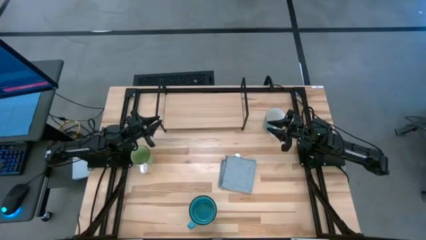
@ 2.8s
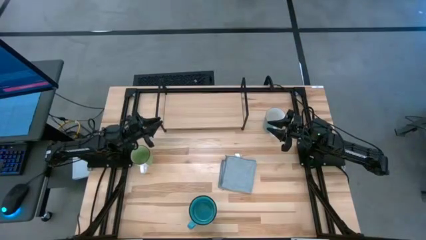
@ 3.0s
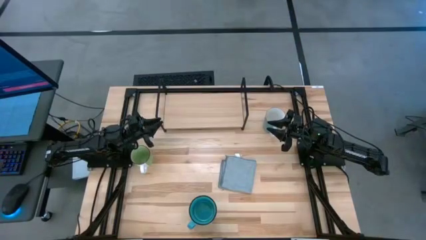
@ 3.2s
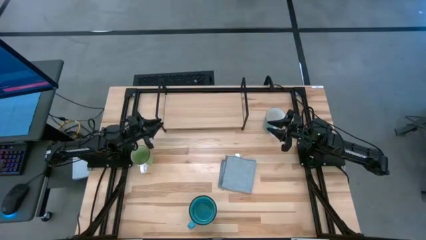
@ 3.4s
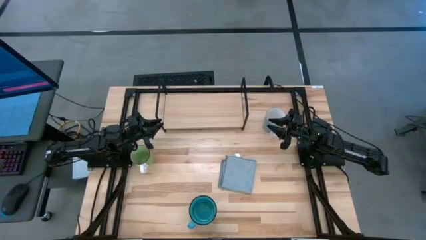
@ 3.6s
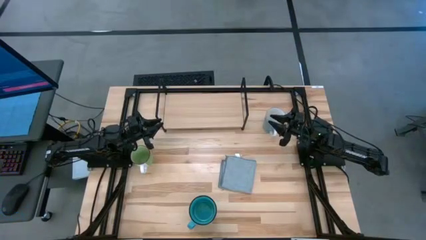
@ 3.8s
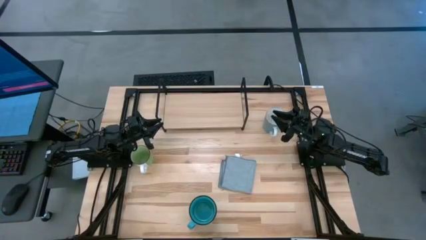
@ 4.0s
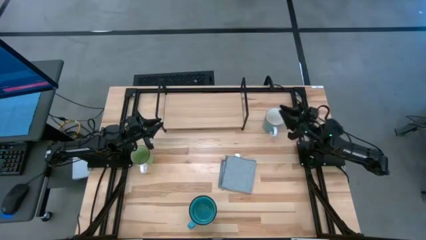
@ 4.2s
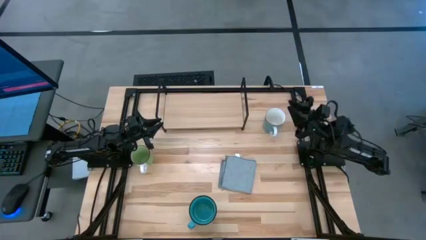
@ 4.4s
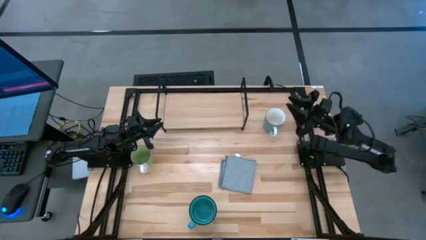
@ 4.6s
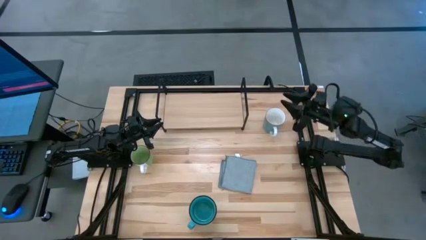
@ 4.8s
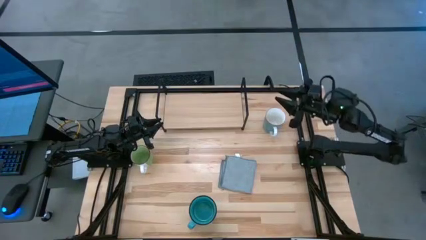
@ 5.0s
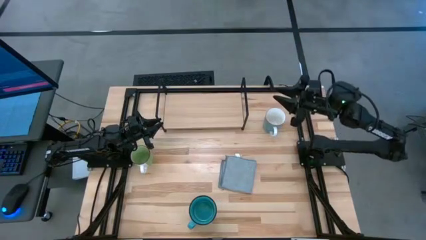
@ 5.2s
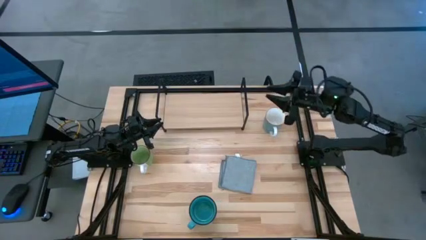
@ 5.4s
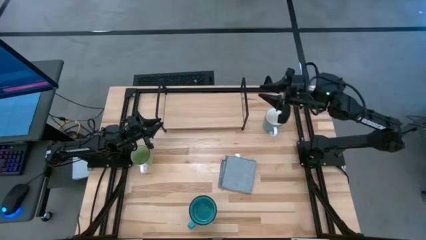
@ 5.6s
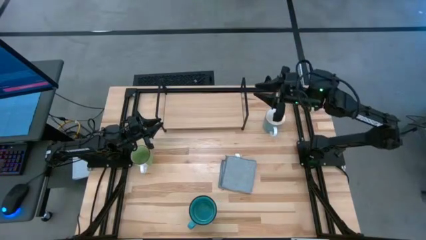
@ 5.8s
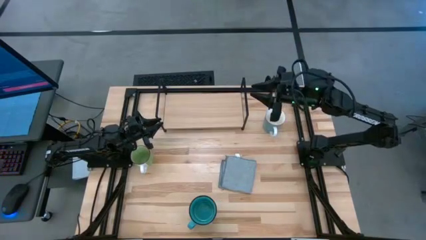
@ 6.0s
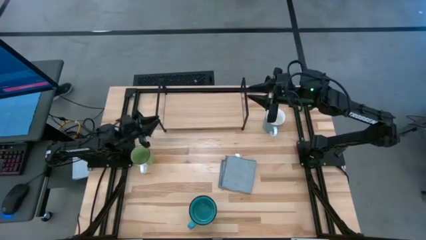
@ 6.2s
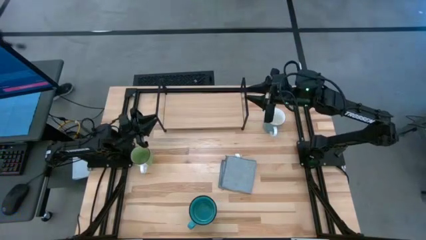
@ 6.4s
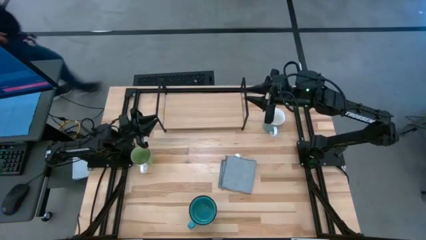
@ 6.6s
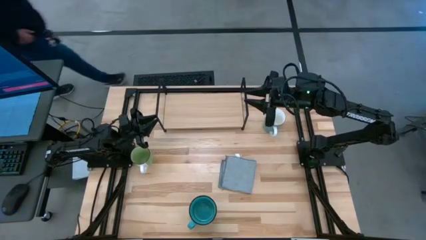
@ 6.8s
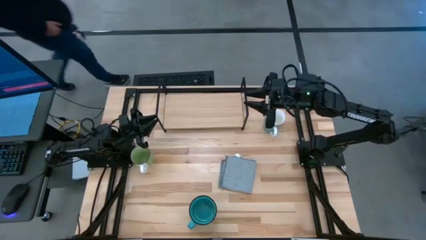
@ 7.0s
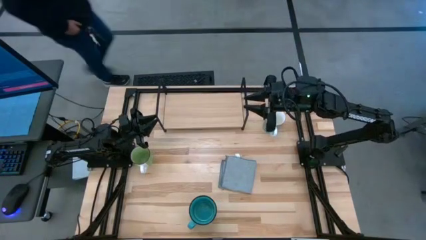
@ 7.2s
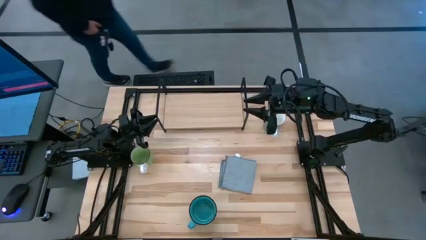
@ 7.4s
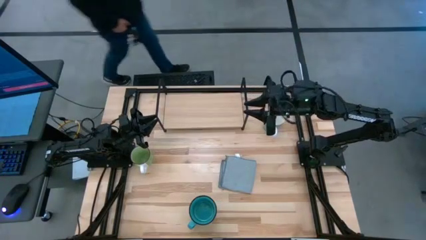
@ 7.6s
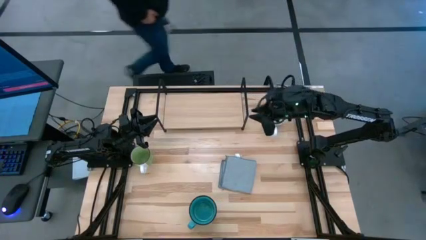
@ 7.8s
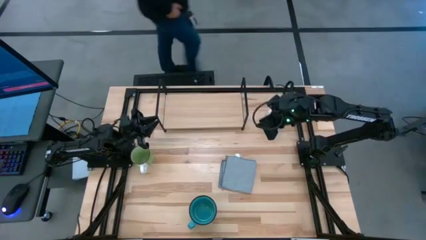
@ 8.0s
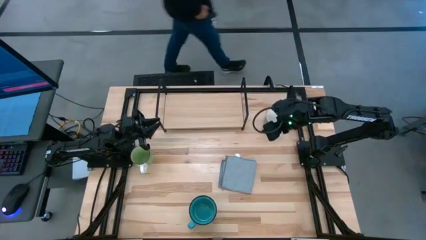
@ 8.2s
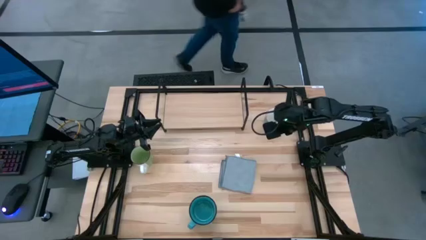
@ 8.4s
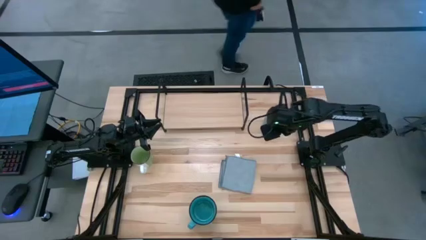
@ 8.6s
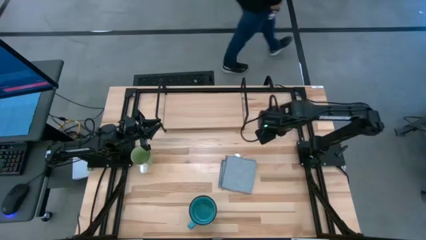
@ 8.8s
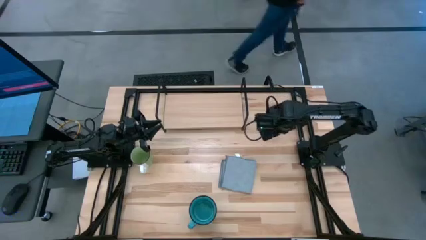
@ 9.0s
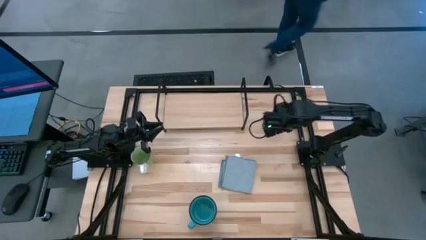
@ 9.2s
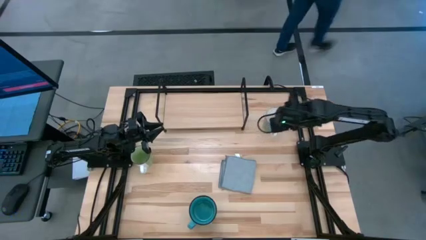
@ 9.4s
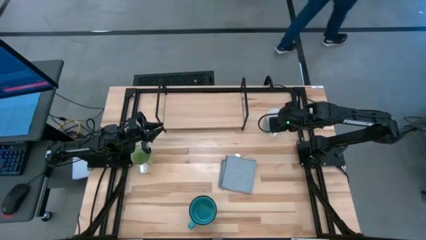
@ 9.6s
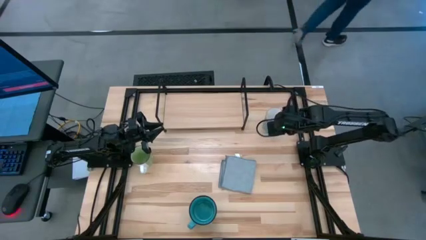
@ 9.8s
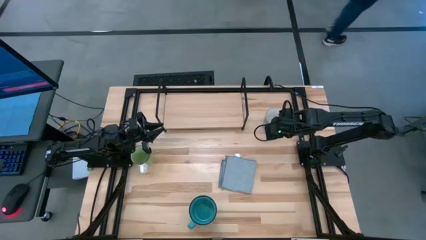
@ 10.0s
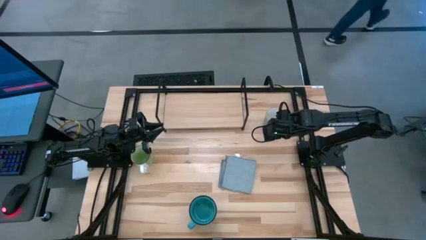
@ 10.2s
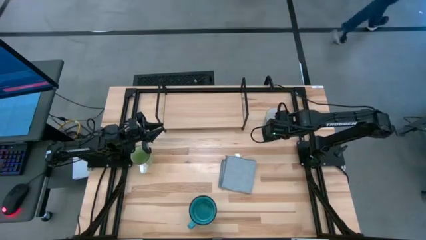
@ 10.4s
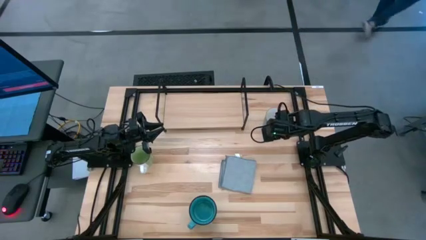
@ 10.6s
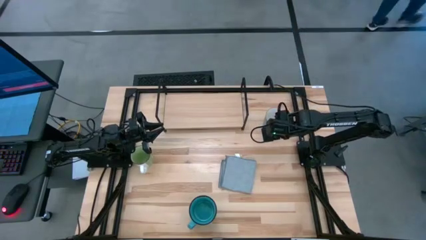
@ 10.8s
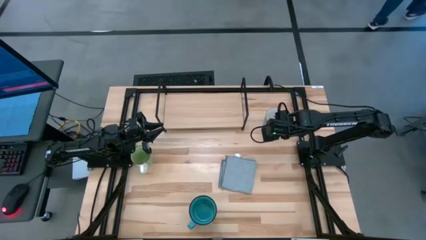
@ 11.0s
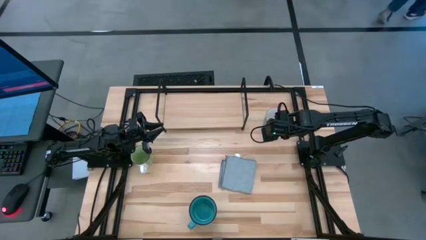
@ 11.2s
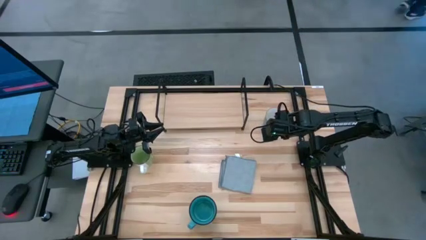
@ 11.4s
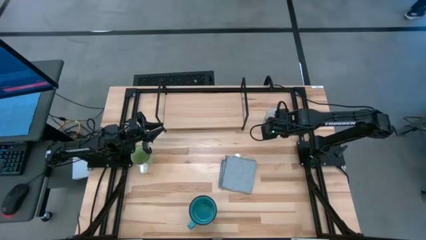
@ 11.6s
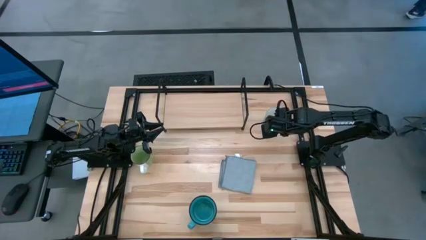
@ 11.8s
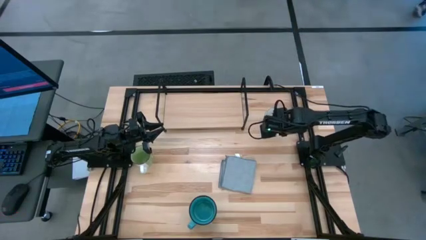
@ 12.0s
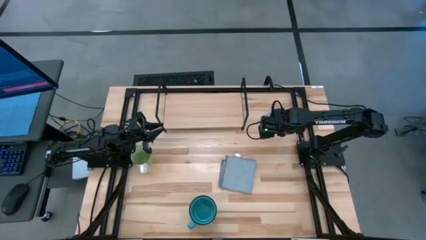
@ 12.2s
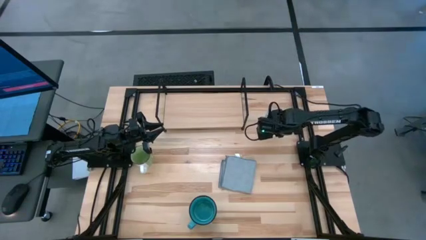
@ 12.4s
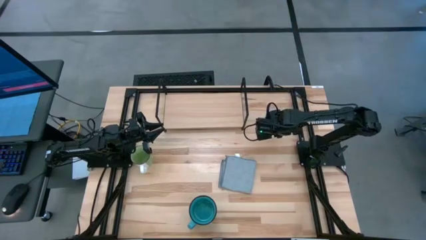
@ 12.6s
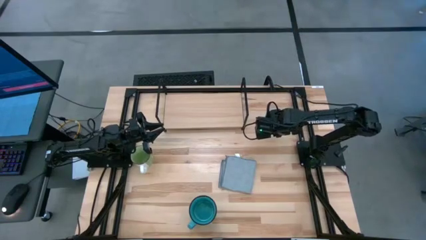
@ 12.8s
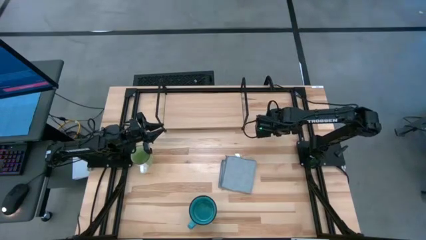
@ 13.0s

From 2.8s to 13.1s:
Task: Stack small to large cups/mugs on shelf
Put the white mug on the shelf

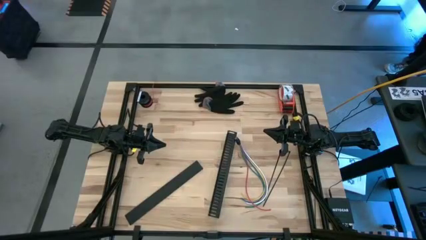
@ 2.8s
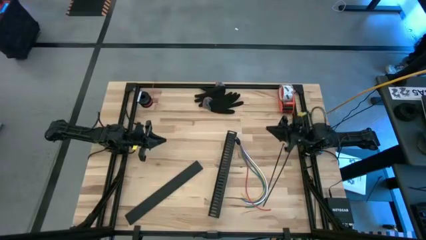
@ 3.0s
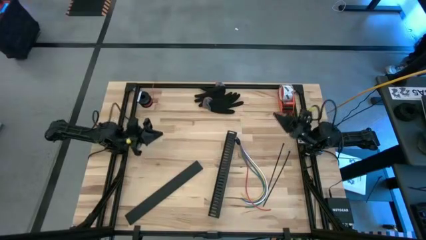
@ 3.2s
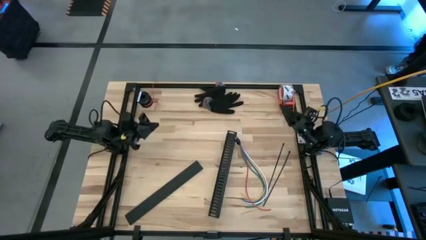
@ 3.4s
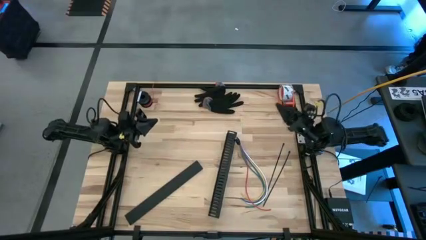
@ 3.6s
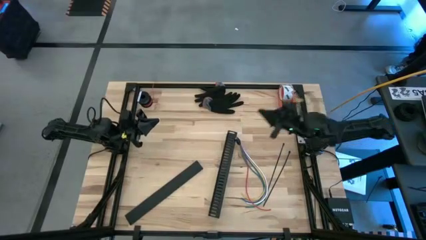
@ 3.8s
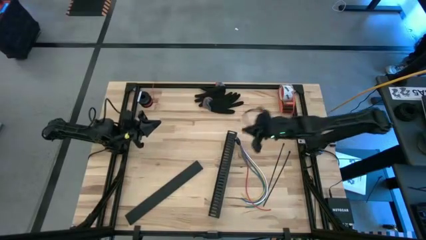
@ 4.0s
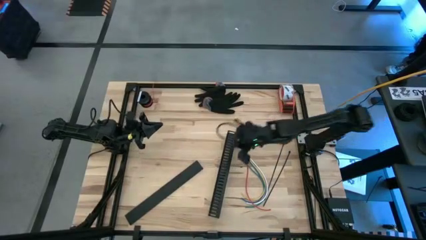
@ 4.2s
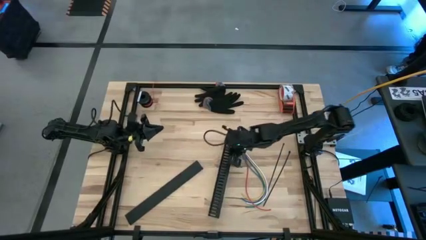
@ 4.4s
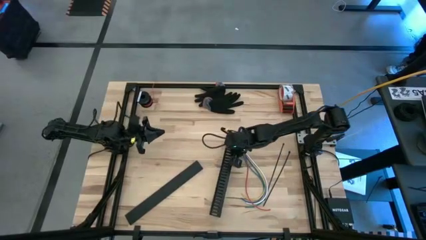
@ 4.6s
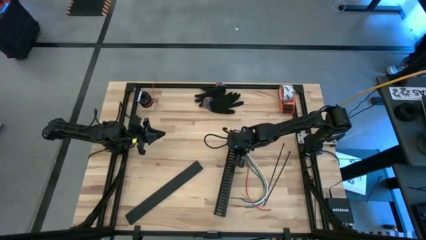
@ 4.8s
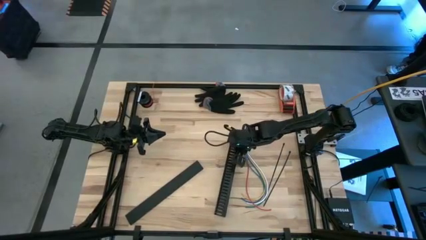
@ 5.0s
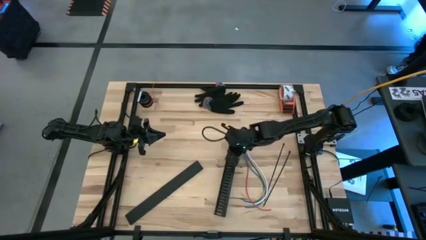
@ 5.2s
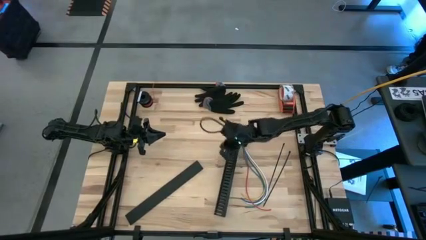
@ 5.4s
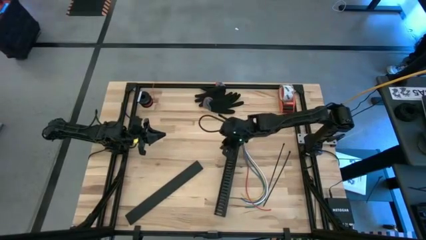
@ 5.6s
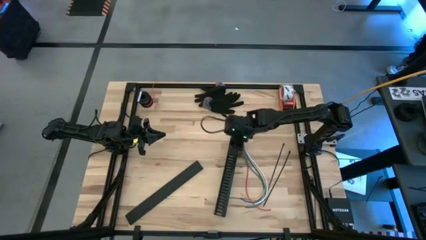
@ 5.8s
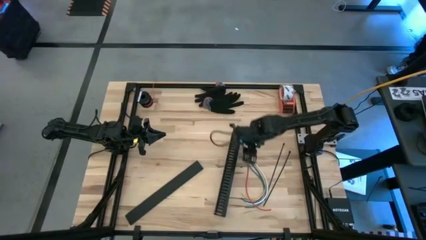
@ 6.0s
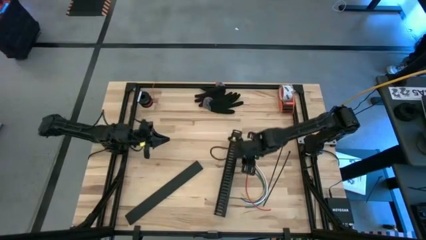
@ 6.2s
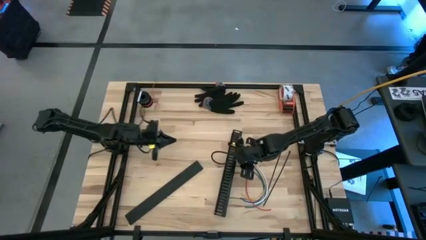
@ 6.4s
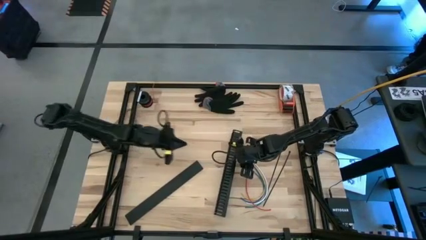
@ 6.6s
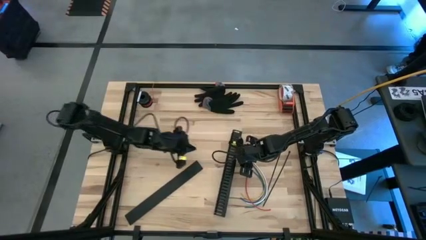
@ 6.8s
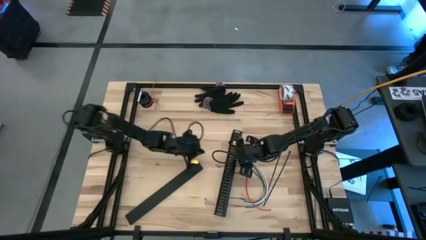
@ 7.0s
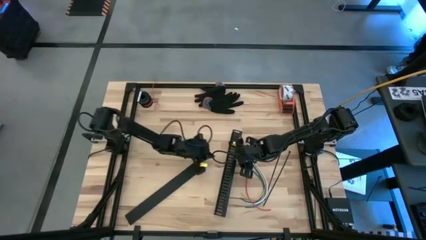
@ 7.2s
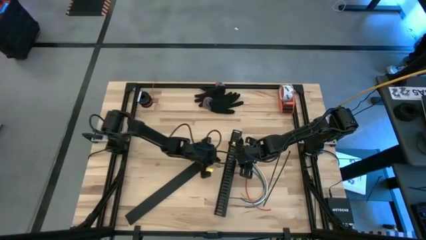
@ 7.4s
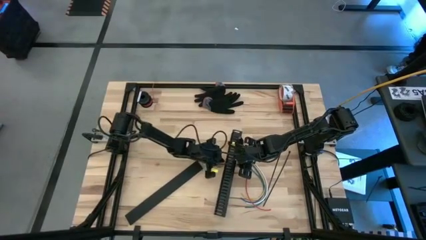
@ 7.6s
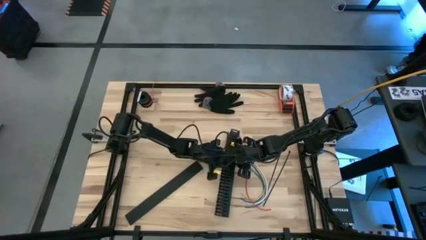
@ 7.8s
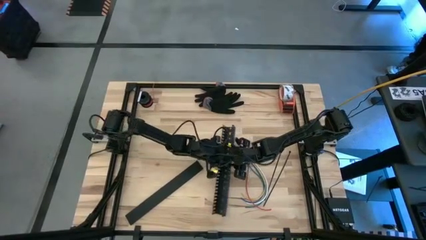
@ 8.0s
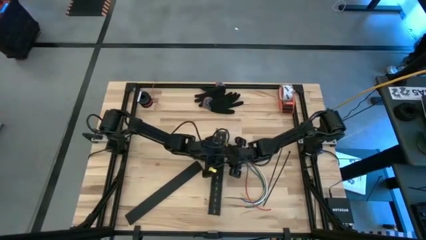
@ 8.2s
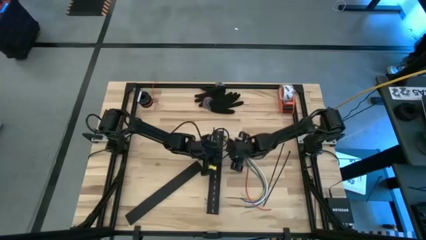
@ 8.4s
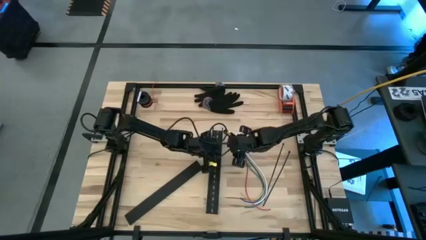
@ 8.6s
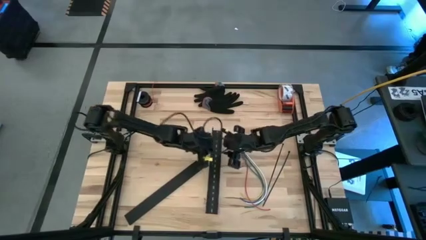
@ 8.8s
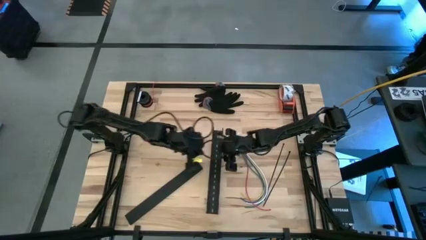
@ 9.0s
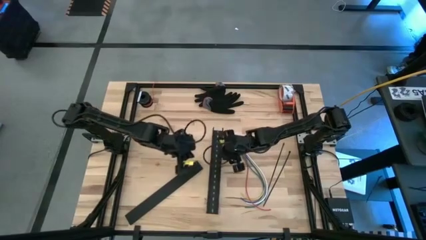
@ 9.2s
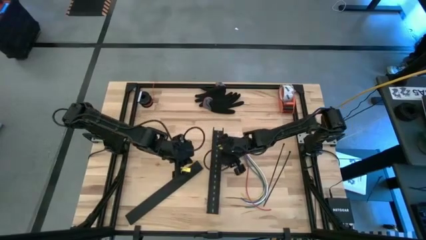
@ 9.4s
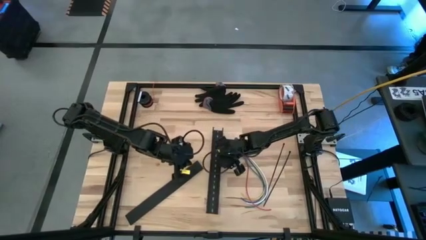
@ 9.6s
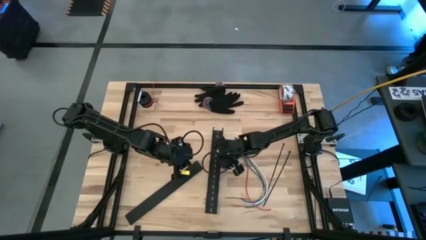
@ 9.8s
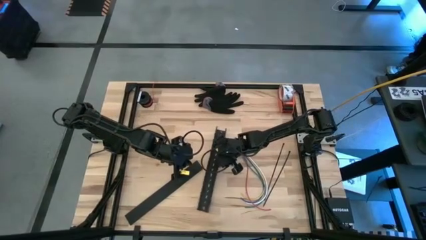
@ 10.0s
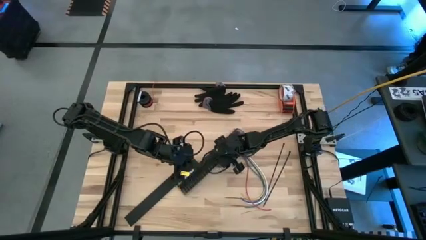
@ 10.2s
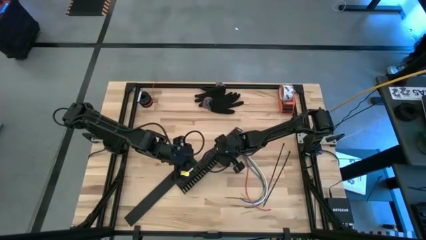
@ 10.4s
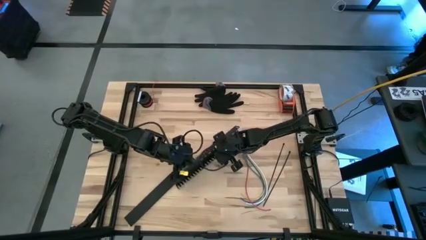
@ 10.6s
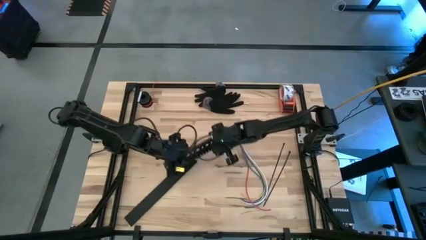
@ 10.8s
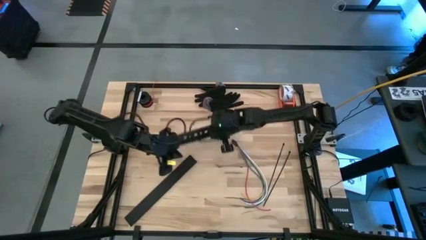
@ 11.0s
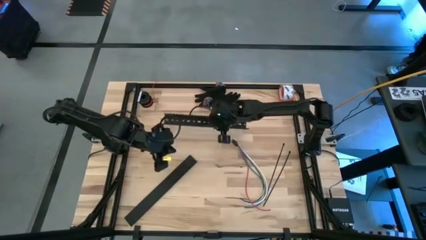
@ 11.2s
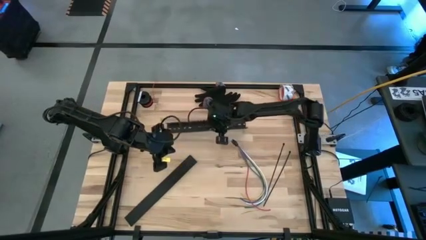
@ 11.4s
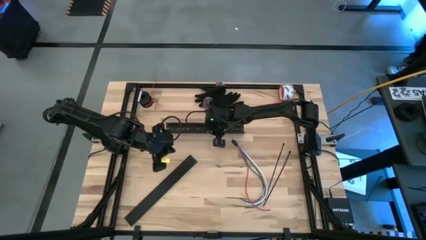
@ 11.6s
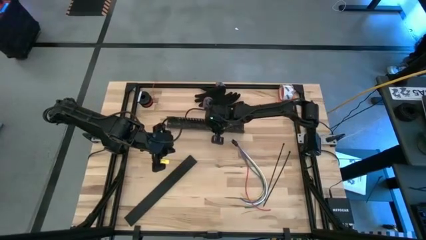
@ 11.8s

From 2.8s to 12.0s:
Task: Ziptie cables
Move the black cable duct to the top of the table
